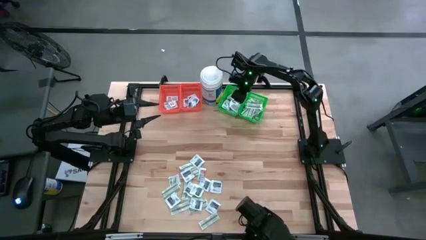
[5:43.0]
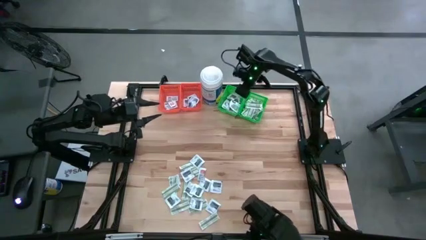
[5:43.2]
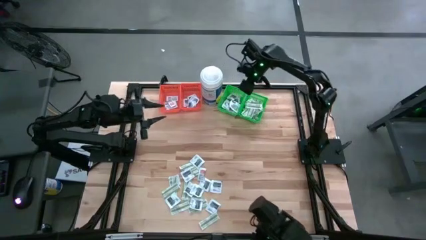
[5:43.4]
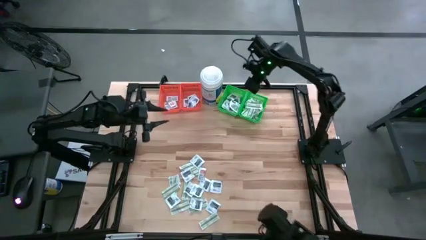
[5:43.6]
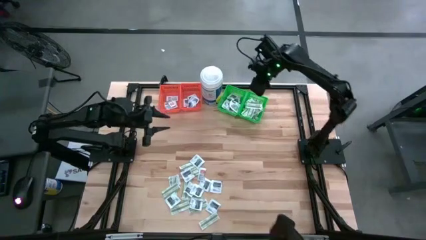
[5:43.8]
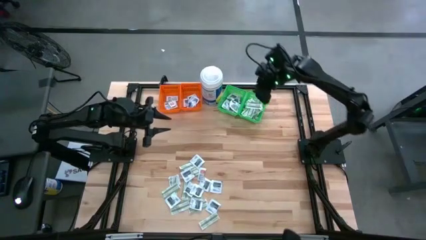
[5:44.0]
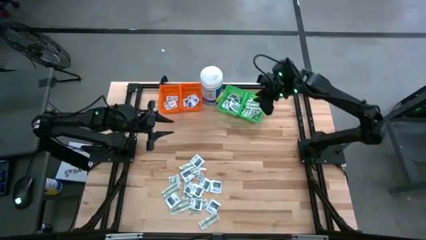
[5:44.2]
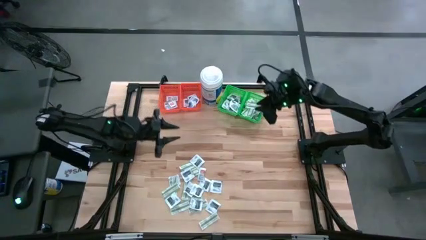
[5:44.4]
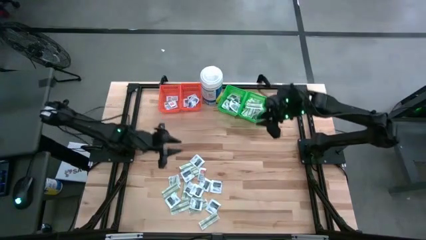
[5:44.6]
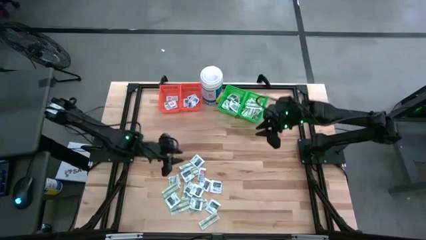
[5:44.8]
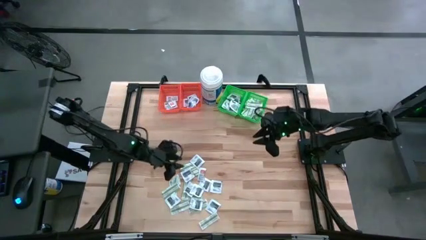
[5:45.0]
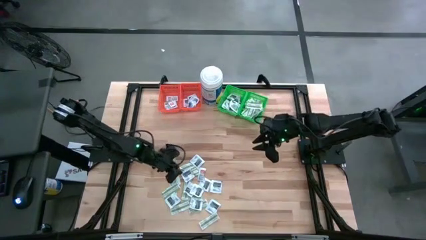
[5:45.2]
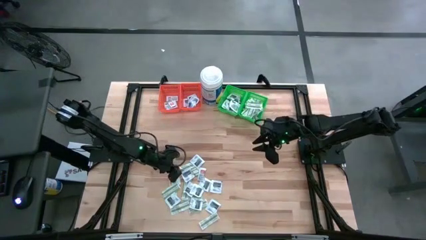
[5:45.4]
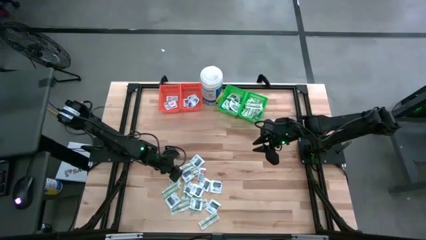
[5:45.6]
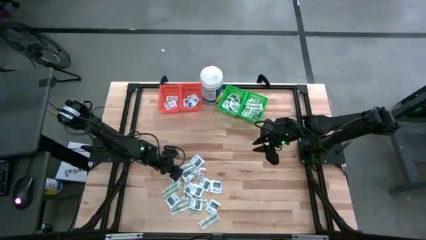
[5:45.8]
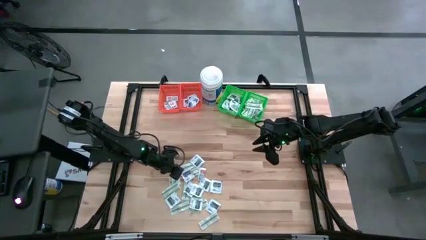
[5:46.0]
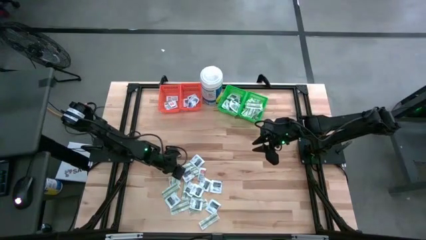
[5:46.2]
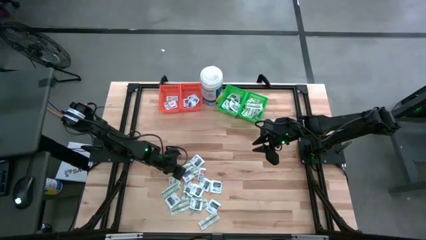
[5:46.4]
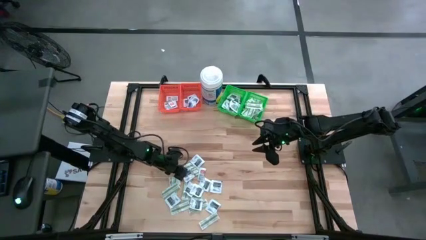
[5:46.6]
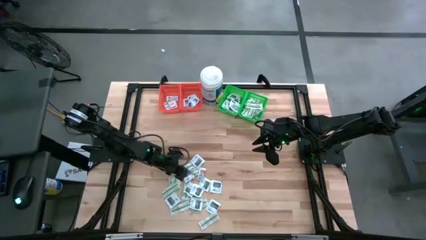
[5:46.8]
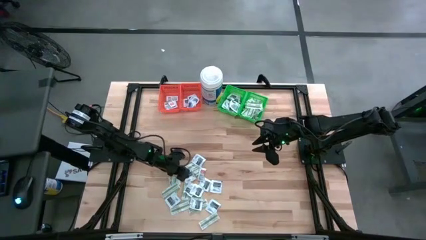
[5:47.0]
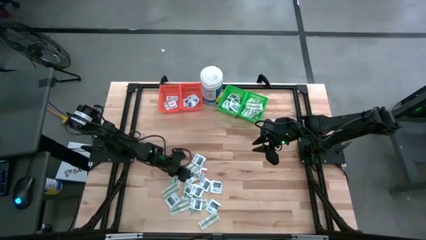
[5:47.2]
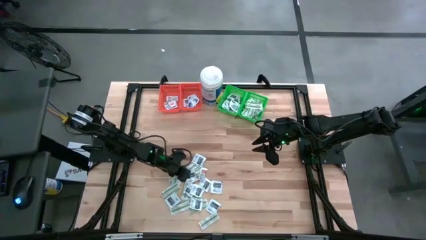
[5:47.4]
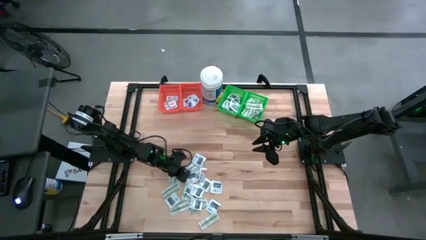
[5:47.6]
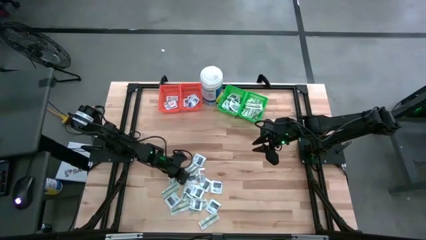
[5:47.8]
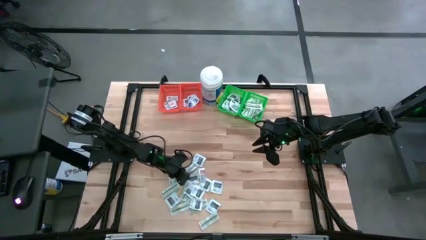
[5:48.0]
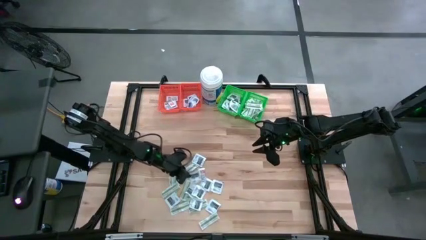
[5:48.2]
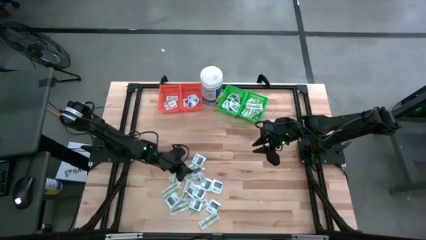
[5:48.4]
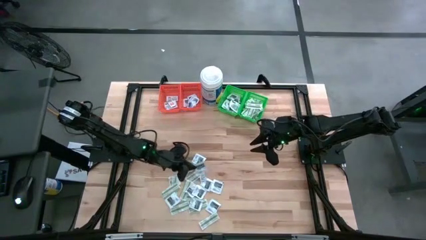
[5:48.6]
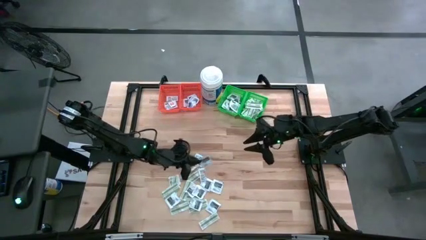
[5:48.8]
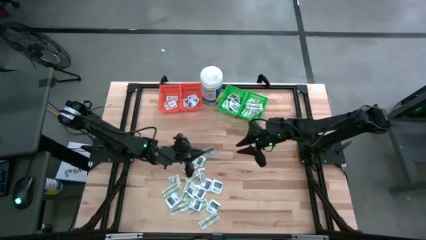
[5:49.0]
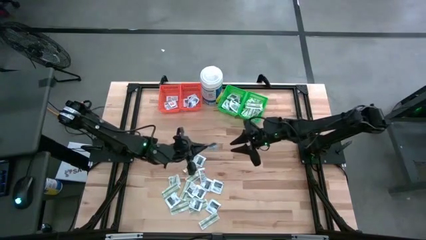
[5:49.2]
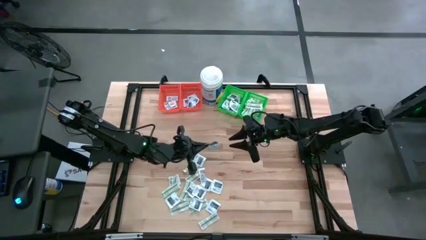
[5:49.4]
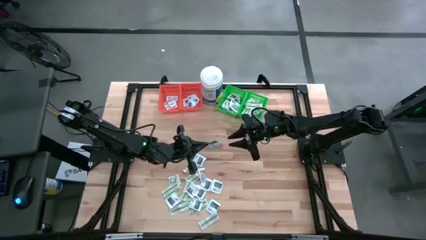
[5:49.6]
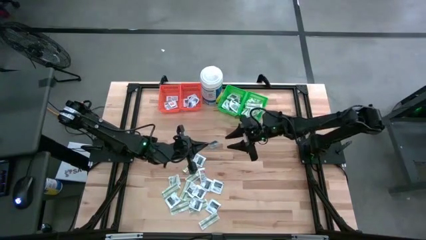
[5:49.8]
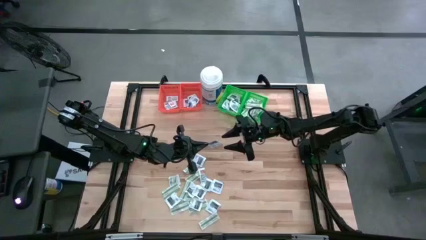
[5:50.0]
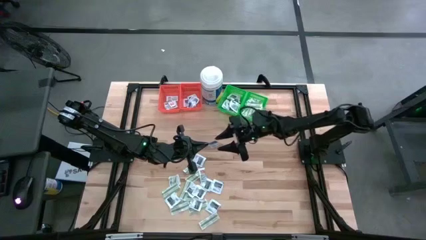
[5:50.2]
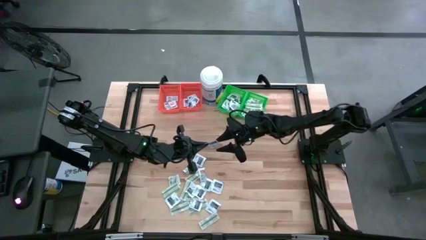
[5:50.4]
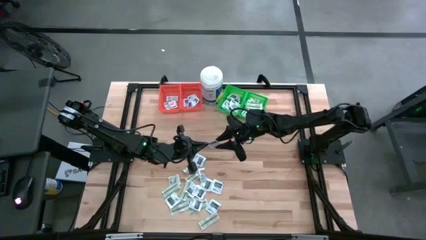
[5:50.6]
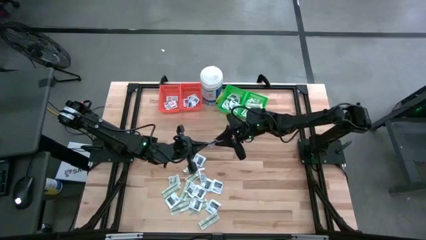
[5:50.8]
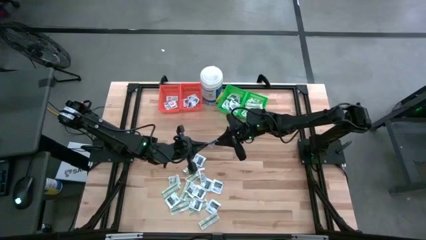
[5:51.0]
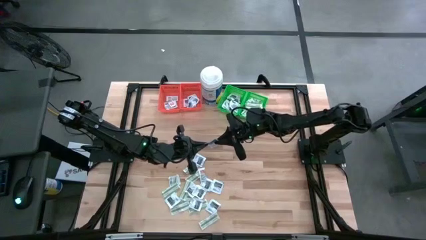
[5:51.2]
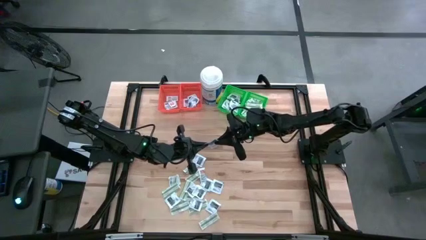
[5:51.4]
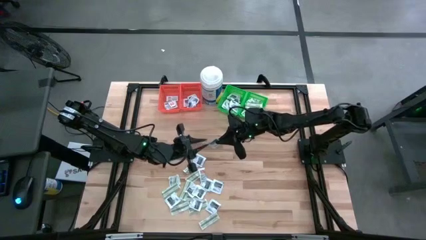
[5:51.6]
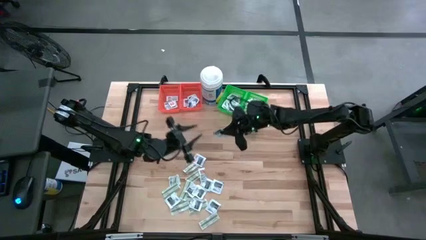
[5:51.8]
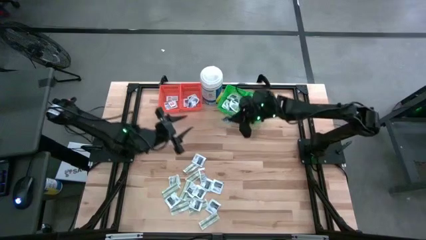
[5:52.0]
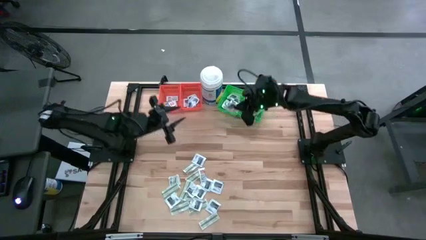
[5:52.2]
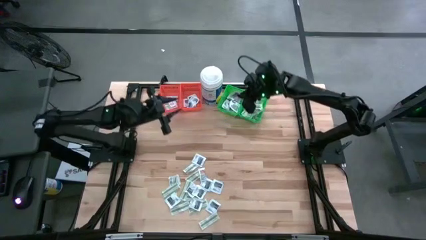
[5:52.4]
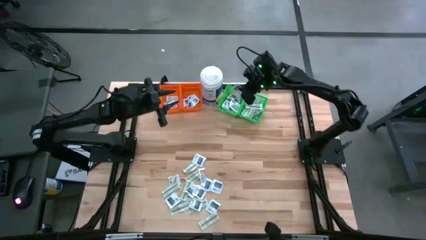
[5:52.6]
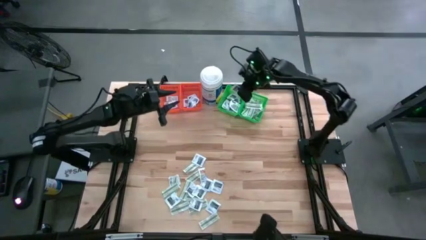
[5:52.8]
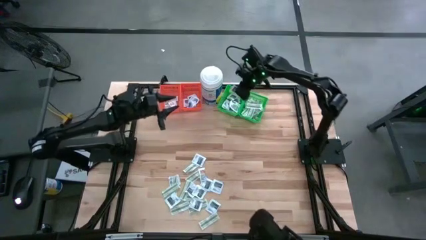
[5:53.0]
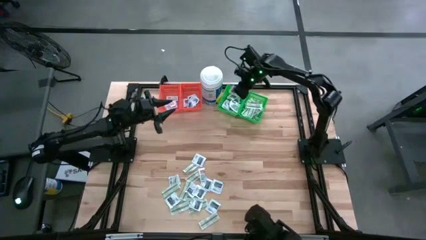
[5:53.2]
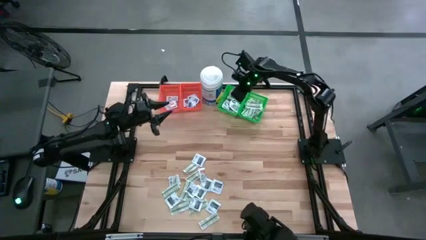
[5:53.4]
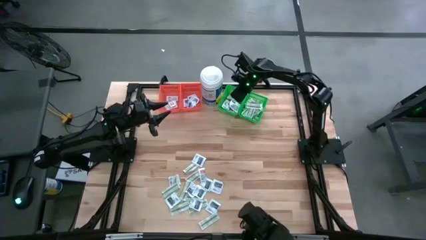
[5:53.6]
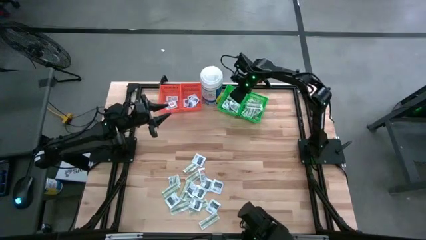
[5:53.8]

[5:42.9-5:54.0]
Task: Pick & Place First Aid Supplies
Put the black towelette pack into the left green bin
